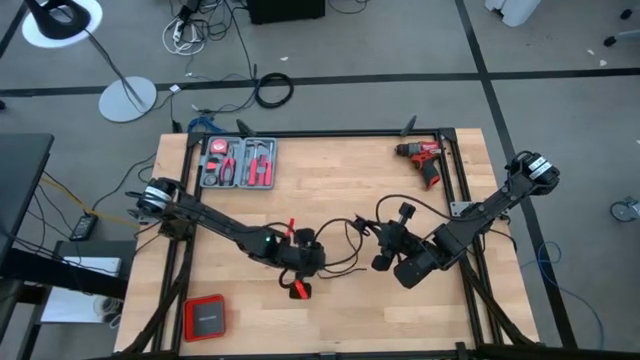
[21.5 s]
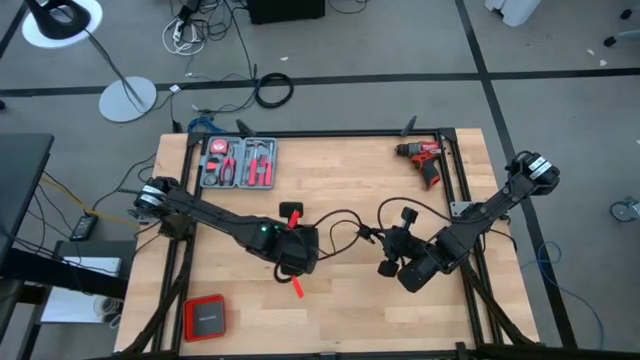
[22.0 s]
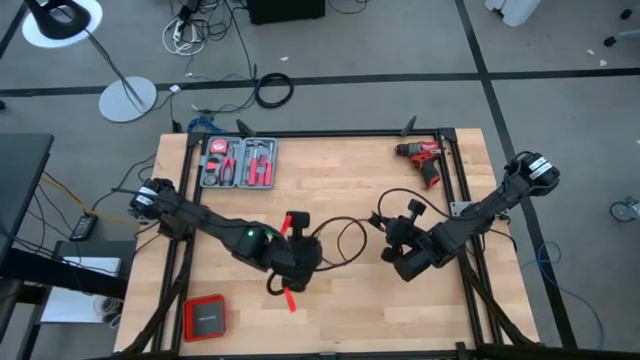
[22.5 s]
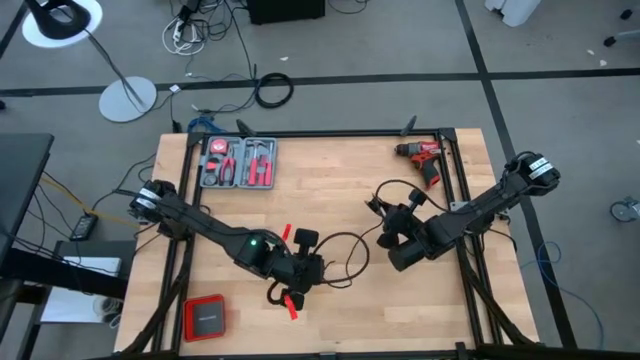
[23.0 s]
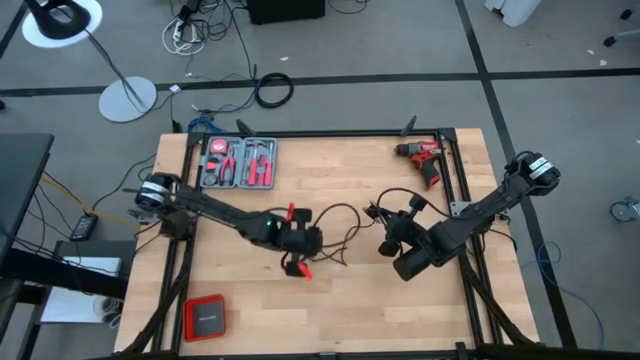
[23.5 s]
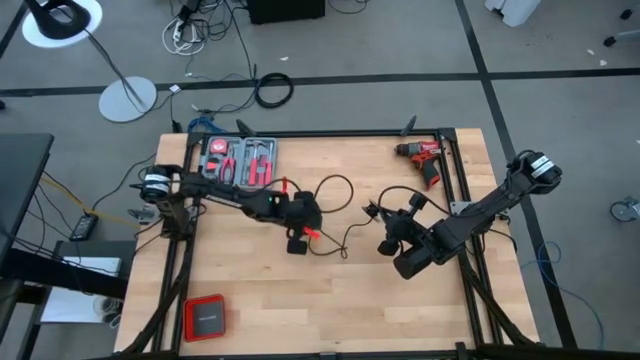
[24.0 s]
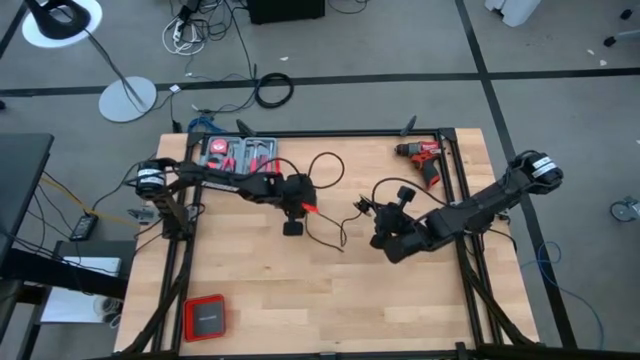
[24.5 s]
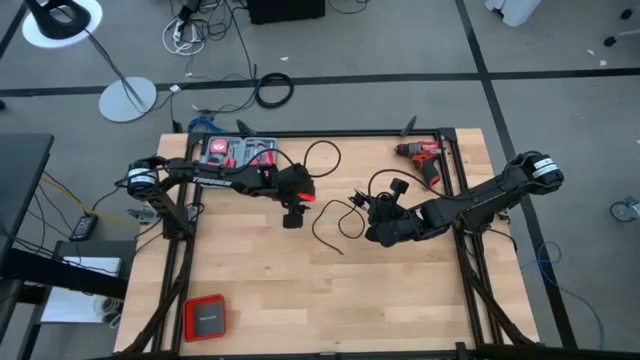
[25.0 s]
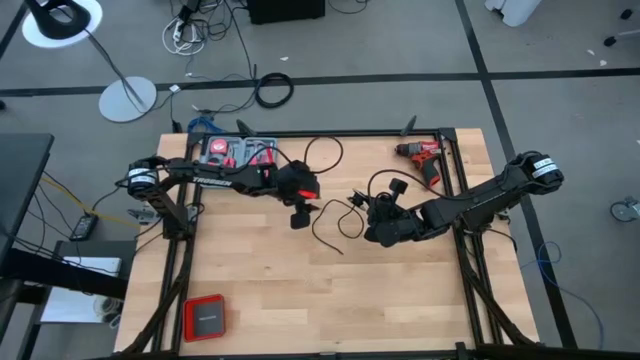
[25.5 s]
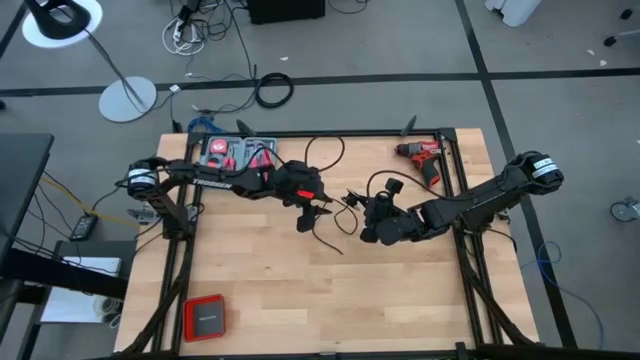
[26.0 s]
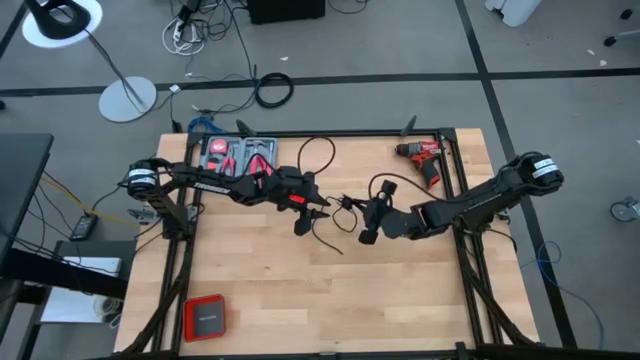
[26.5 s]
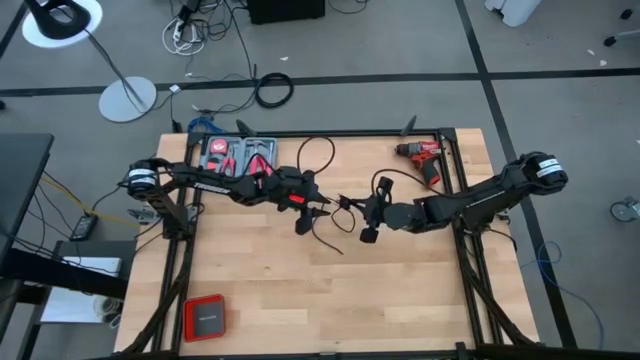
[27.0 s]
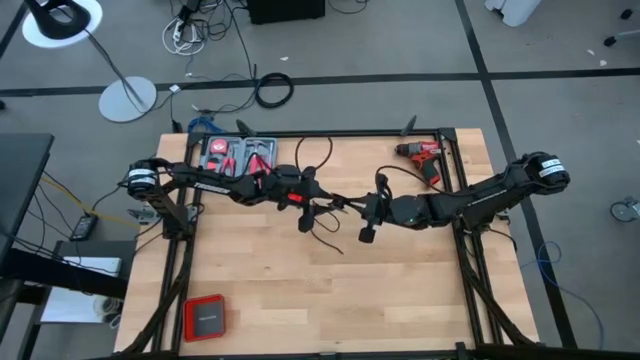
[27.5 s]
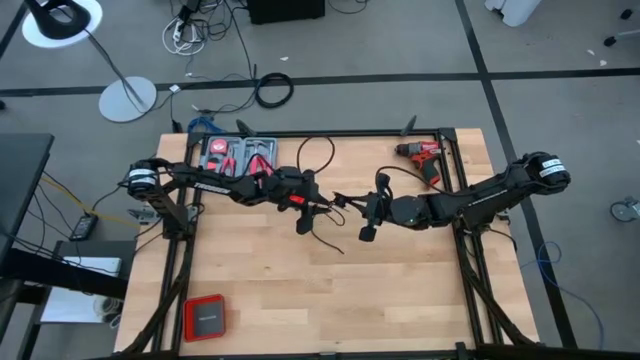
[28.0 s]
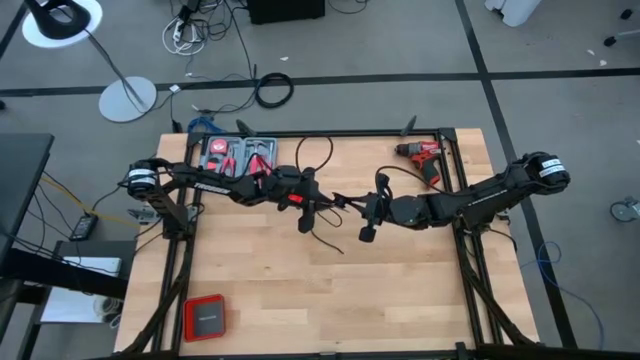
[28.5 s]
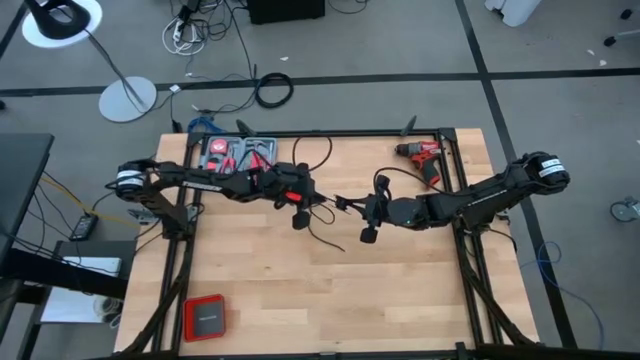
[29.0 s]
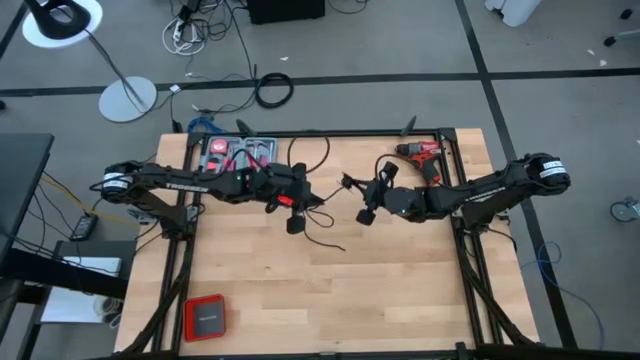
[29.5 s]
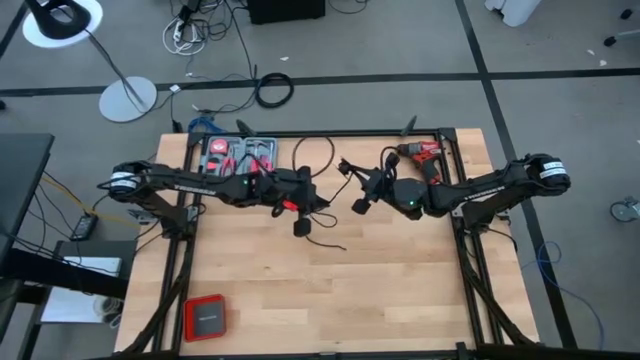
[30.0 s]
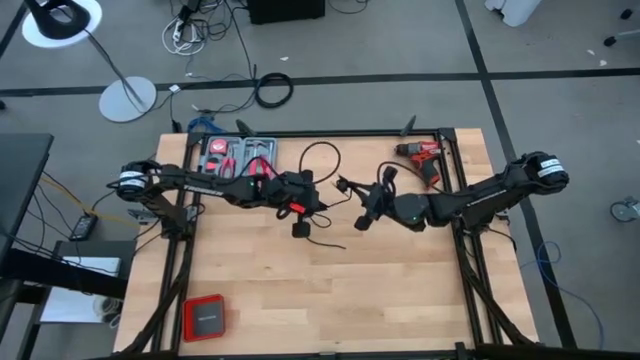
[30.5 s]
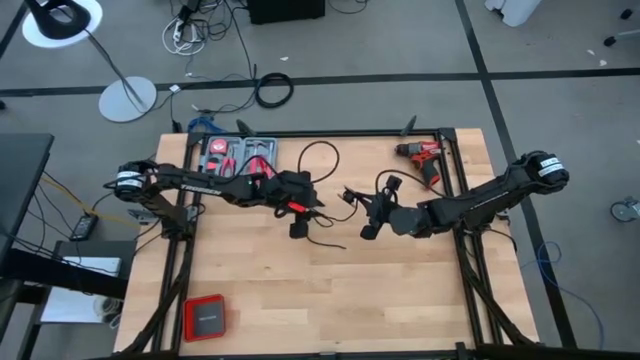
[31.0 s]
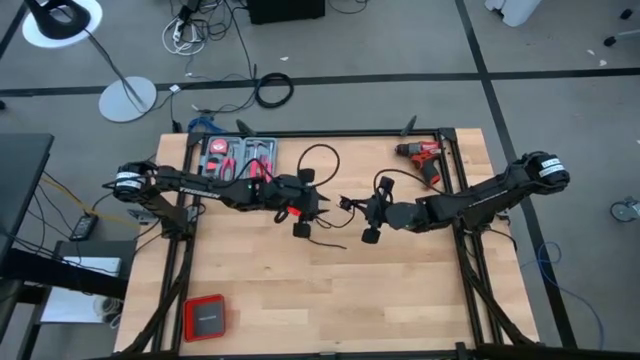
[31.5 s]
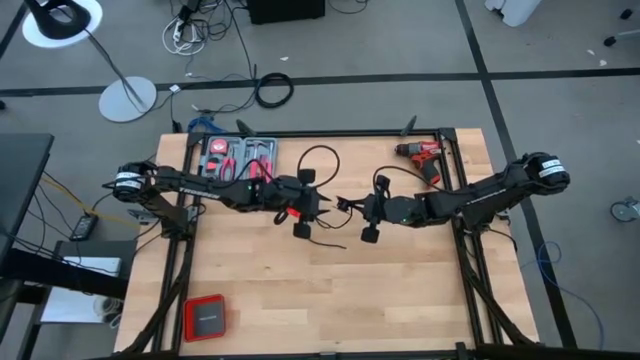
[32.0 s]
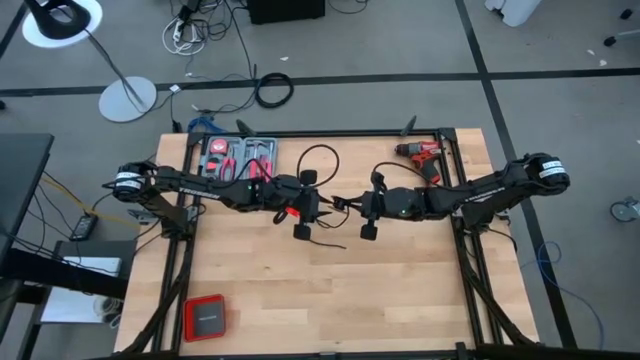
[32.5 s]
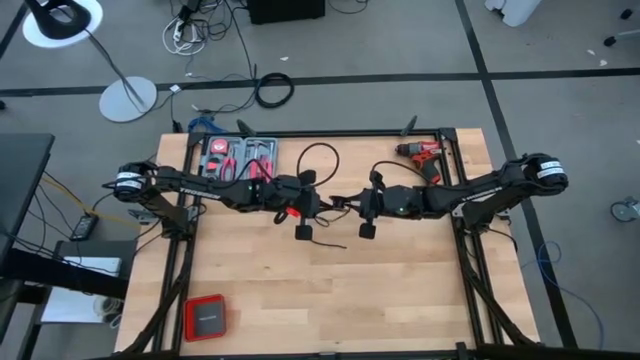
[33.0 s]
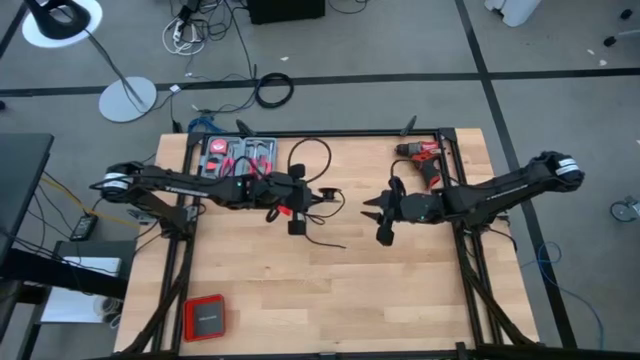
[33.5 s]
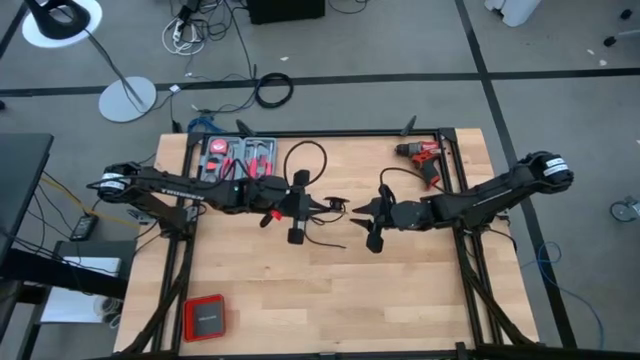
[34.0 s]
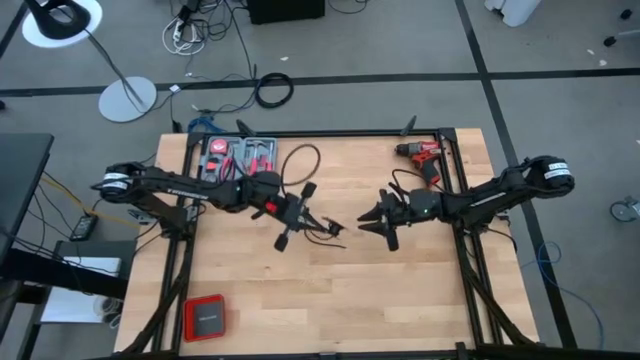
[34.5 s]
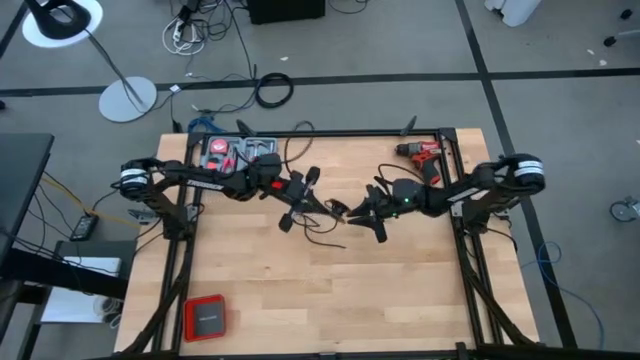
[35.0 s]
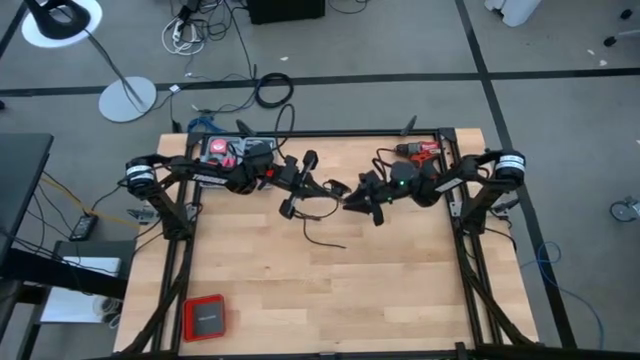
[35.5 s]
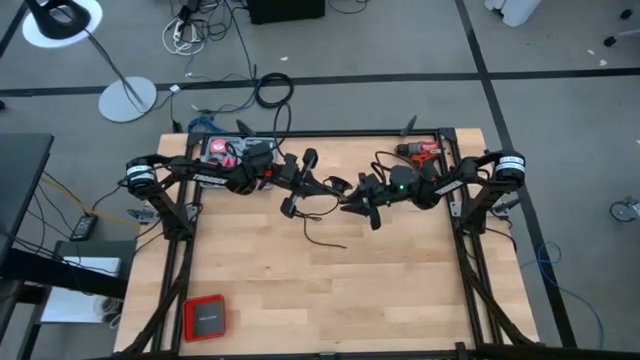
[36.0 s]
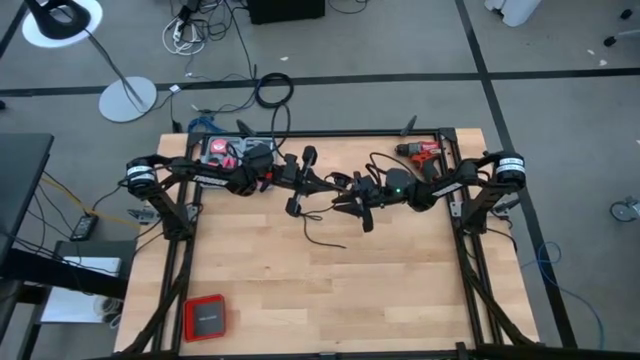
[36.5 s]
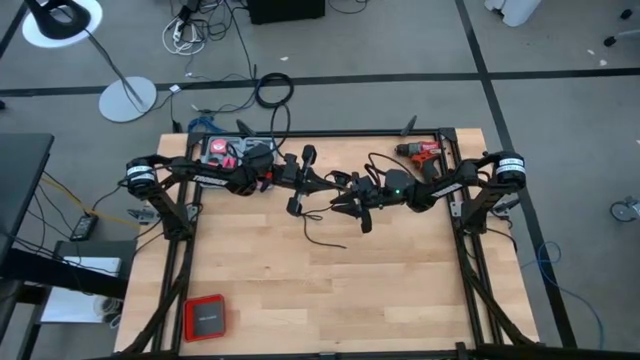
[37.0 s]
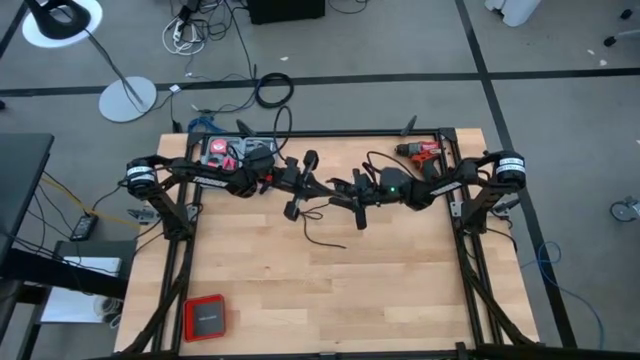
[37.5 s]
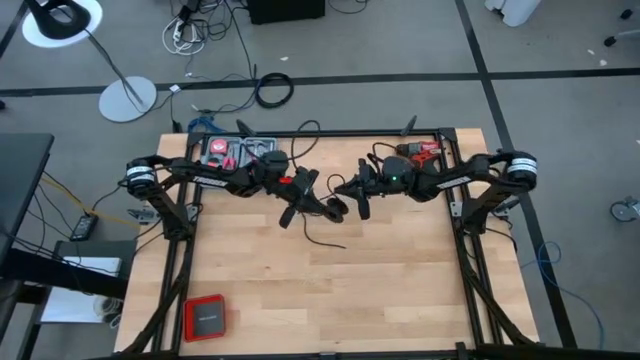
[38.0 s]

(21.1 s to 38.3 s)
Task: Coil cords
Uncoil the black wire on the spool
